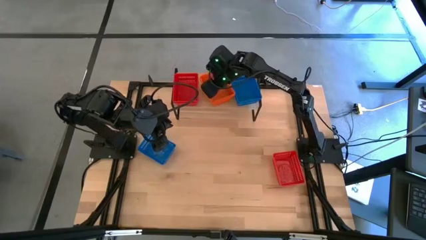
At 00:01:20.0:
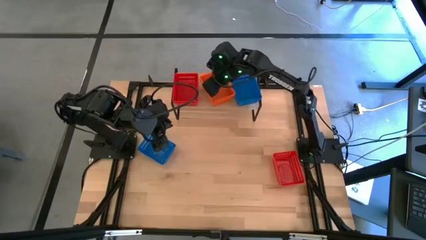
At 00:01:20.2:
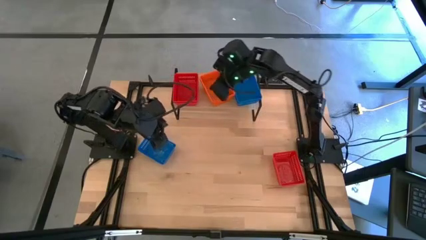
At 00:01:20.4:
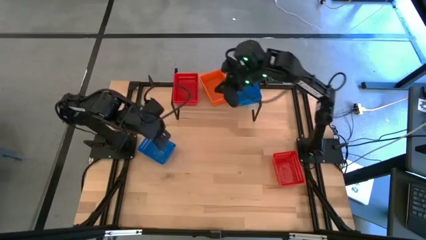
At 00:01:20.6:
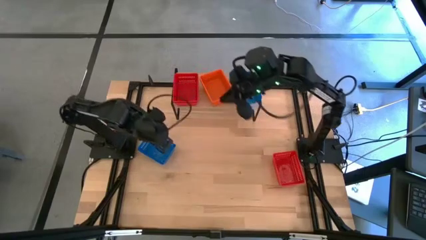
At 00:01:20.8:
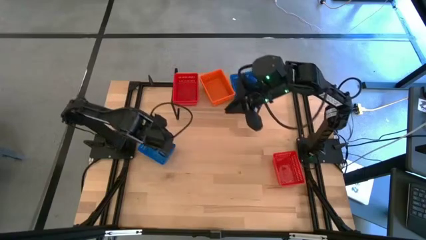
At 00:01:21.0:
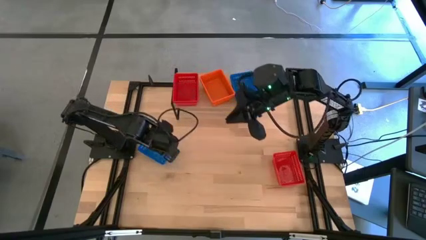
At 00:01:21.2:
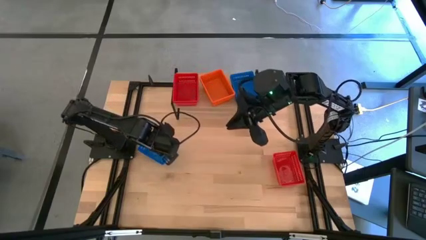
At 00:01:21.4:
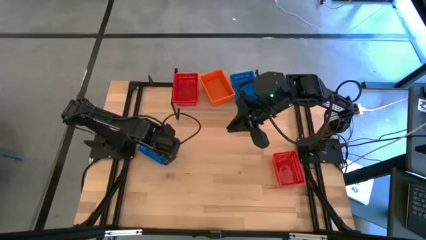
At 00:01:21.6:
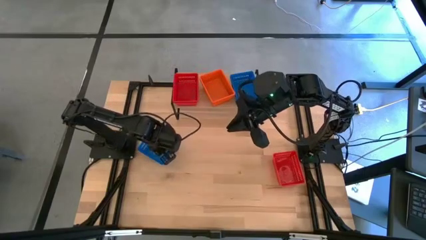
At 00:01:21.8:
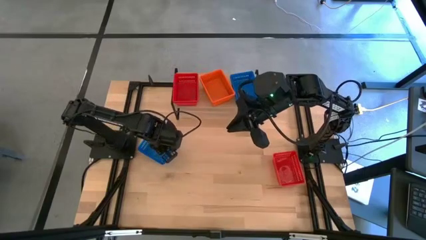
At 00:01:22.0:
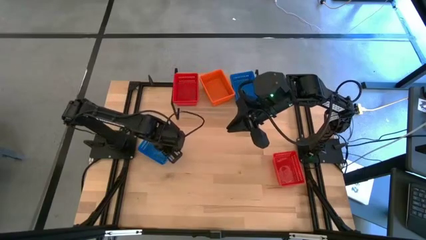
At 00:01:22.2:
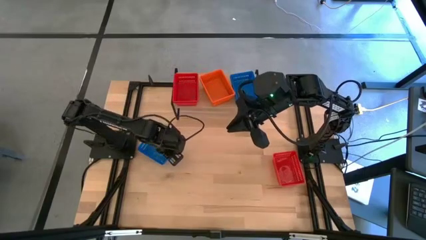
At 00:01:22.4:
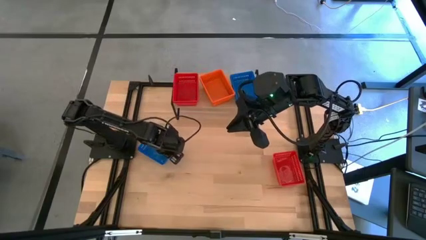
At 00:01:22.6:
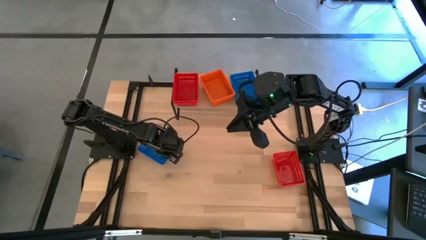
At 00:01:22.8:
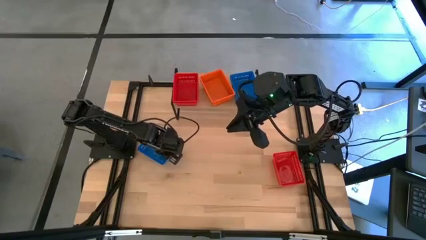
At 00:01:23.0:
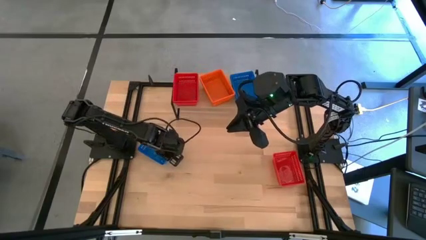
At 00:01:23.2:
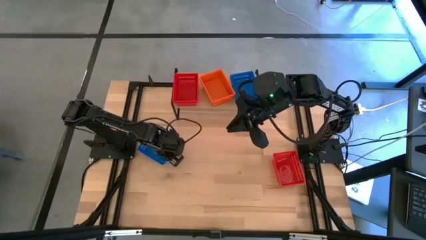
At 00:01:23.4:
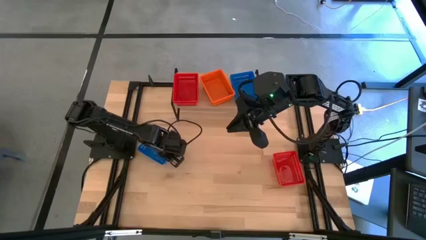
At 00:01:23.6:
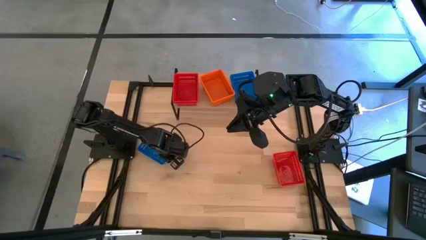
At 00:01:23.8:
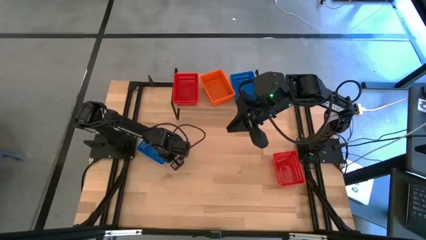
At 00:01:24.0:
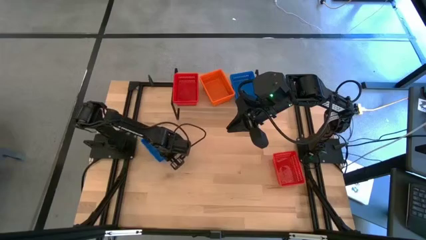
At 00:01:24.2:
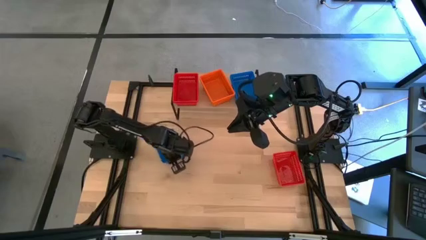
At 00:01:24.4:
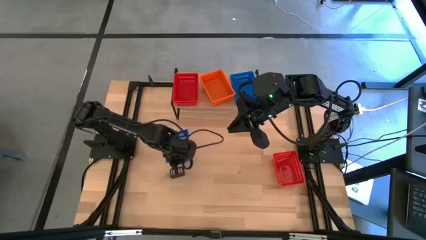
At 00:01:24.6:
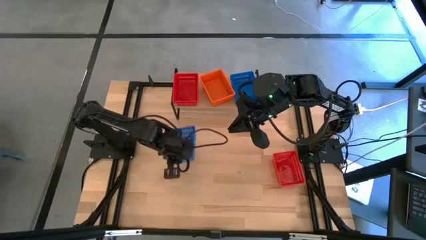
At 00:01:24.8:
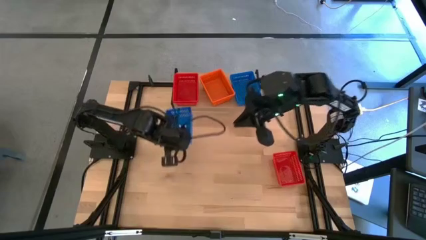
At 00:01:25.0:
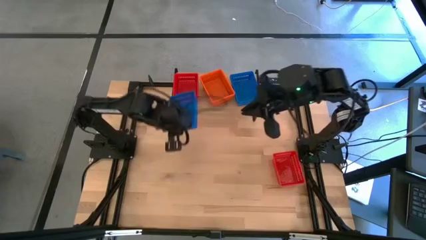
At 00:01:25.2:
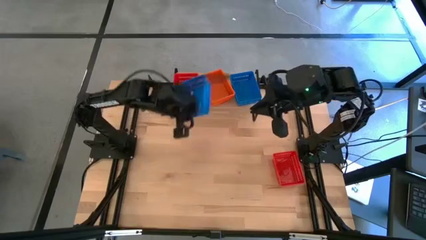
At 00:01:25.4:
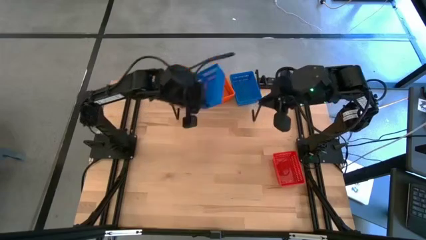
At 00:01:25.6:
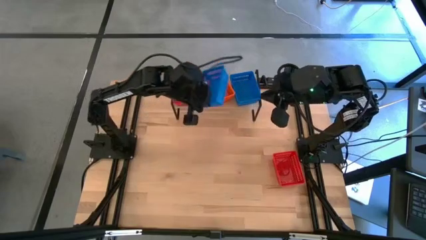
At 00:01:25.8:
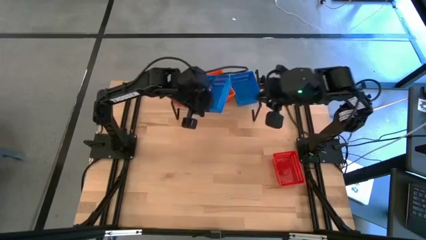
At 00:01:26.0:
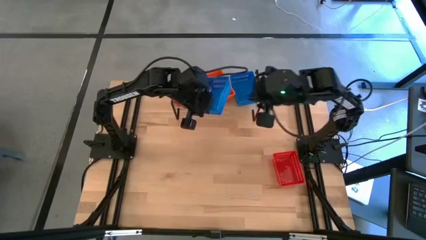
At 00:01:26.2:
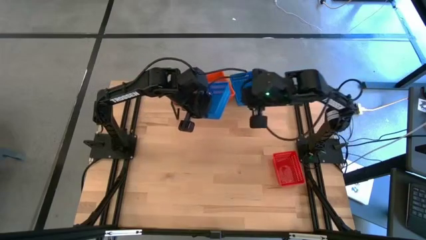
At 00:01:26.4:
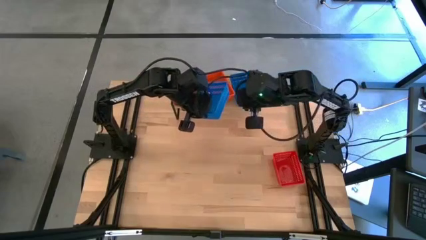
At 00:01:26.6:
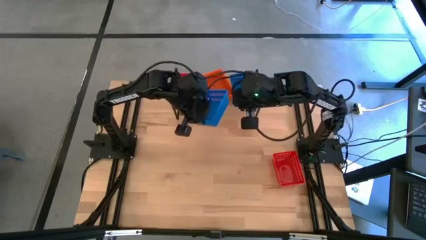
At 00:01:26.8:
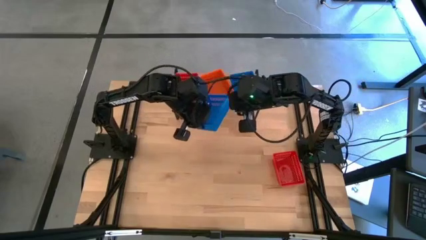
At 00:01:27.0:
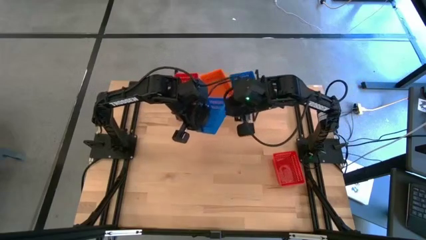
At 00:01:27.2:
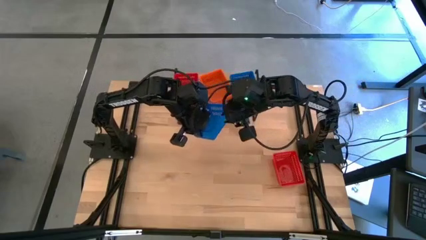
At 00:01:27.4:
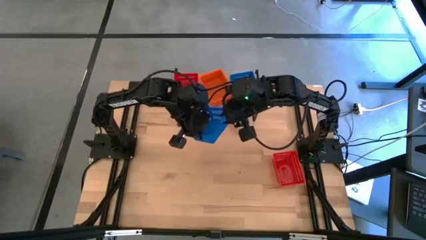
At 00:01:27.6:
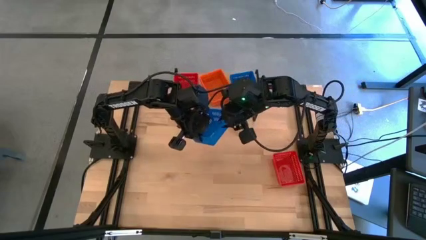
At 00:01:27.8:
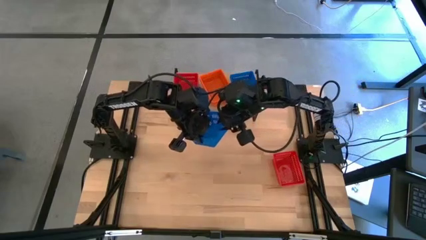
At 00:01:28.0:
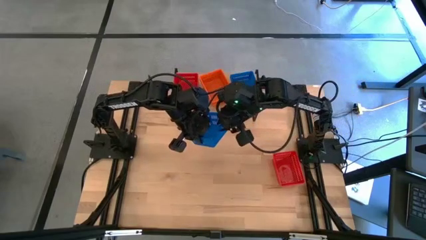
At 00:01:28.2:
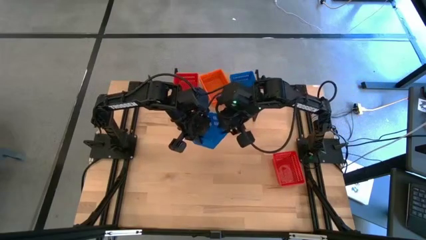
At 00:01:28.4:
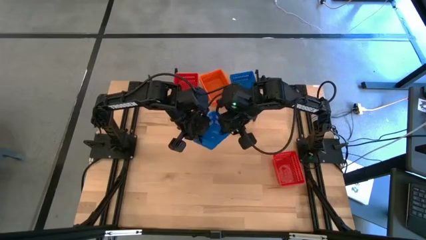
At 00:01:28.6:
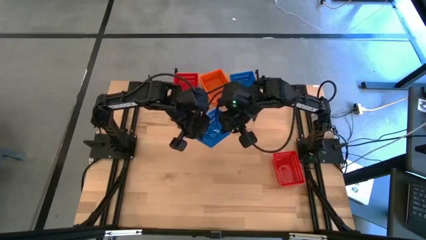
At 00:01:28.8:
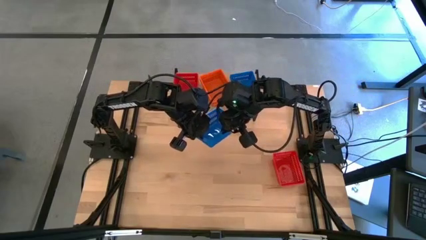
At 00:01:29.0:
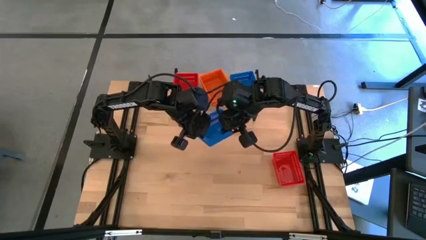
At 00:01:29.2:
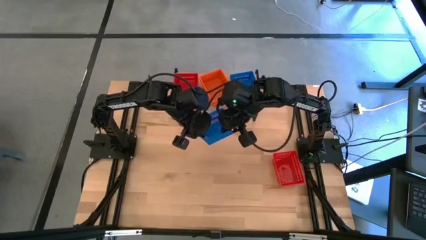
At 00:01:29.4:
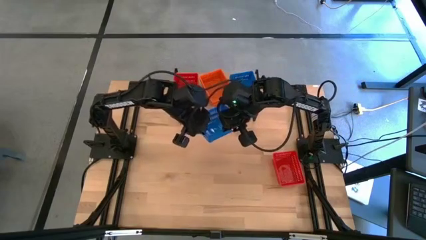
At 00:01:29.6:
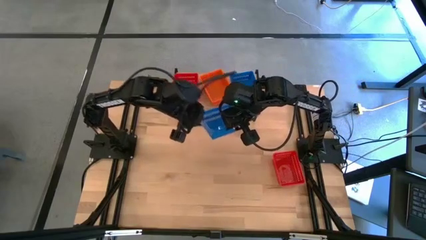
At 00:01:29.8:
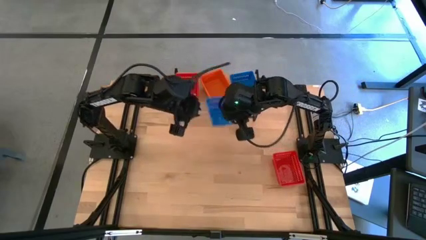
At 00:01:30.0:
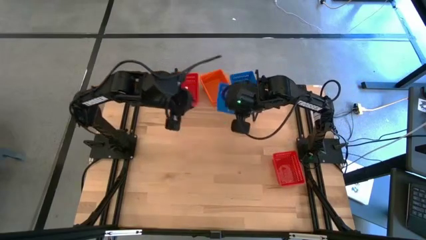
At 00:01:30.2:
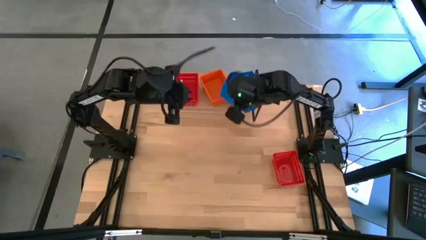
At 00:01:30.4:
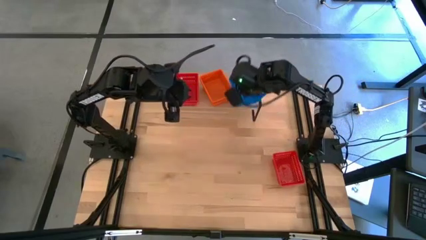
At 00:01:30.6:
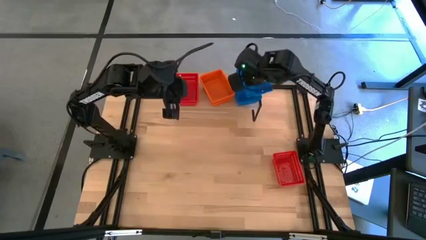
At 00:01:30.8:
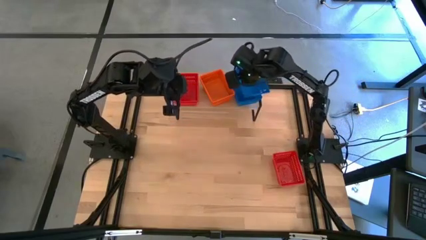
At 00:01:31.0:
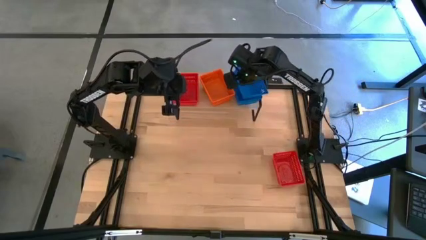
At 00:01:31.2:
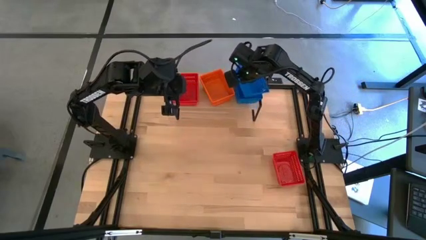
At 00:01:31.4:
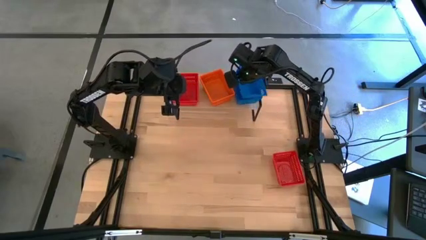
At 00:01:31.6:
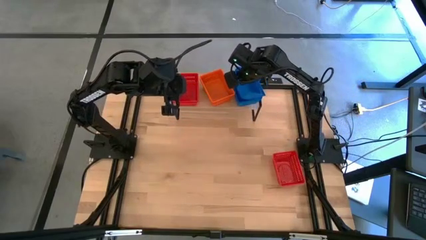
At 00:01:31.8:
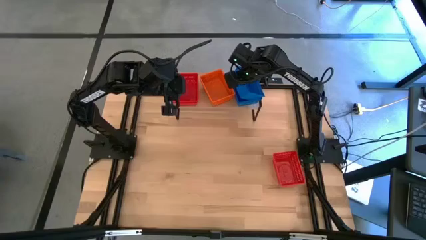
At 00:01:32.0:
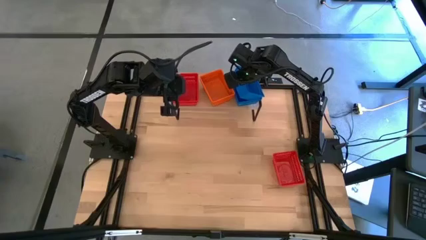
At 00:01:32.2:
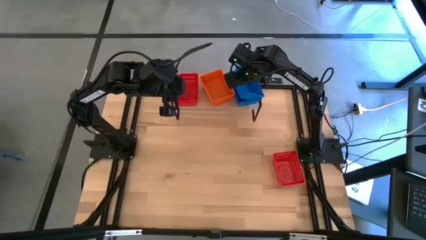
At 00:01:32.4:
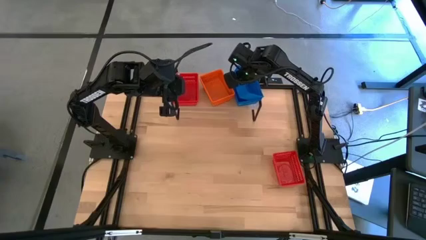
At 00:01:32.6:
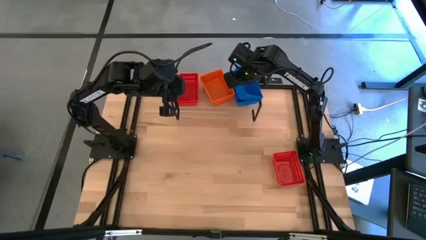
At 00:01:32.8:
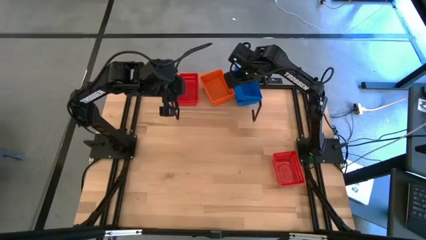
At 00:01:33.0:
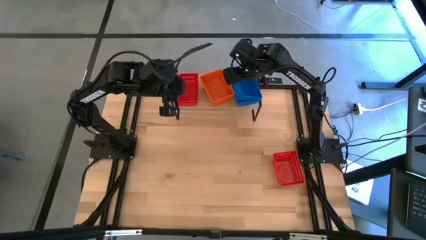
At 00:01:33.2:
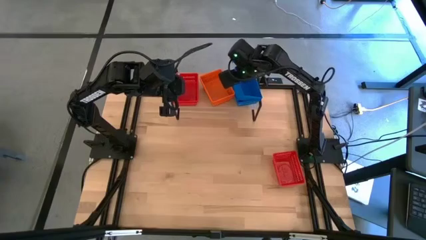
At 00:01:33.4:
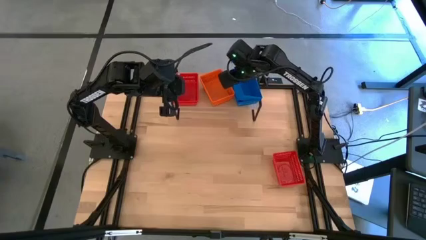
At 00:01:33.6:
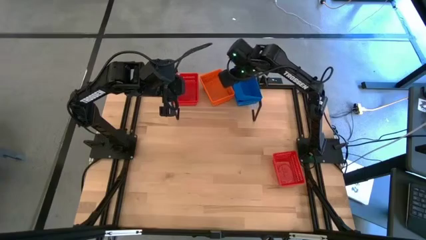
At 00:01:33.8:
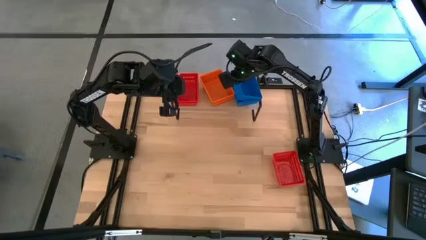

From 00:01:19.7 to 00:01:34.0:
Task: Stack baskets on shelf by color
Stack the blue basket into the blue basket on the shelf
